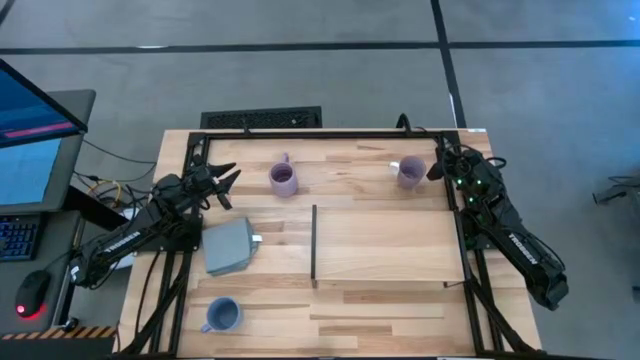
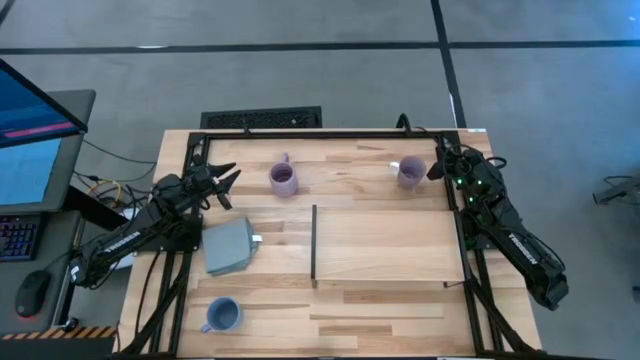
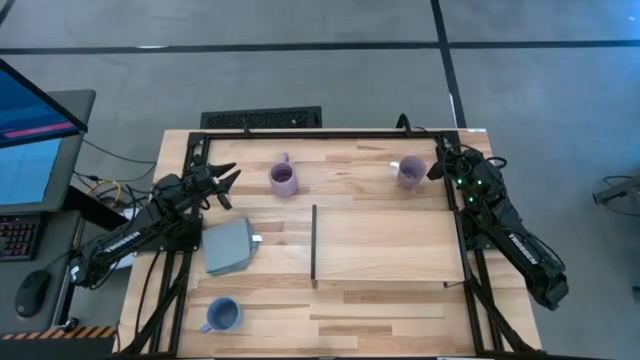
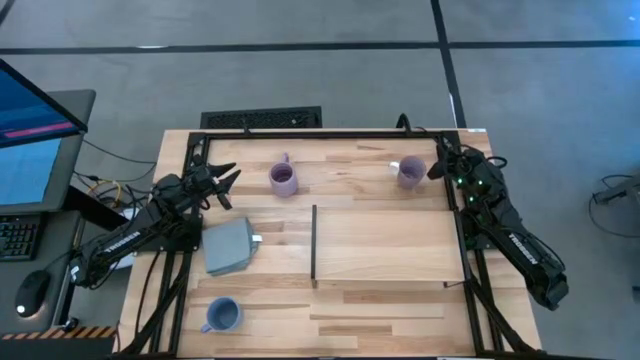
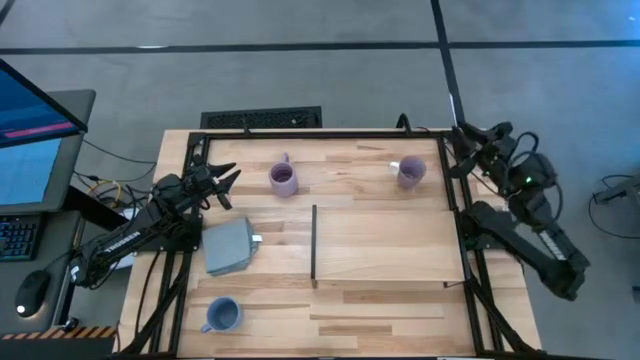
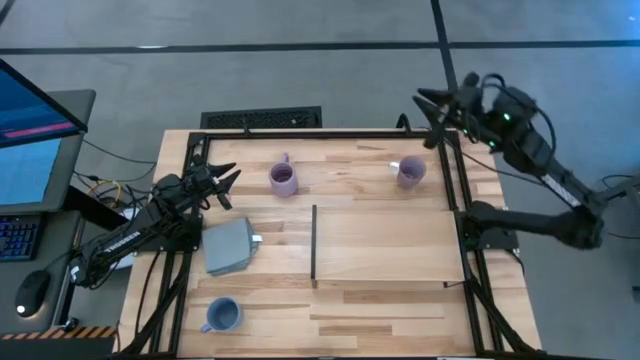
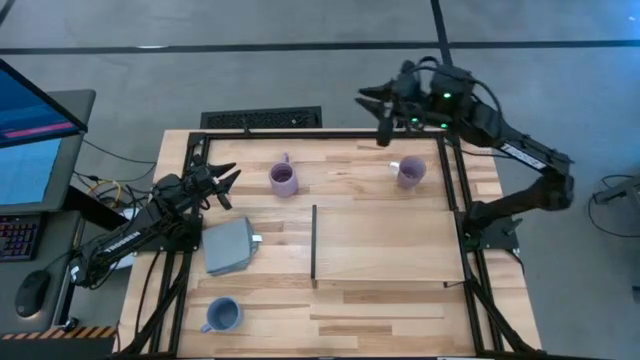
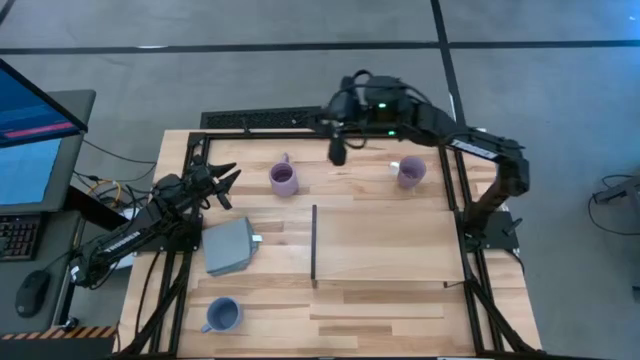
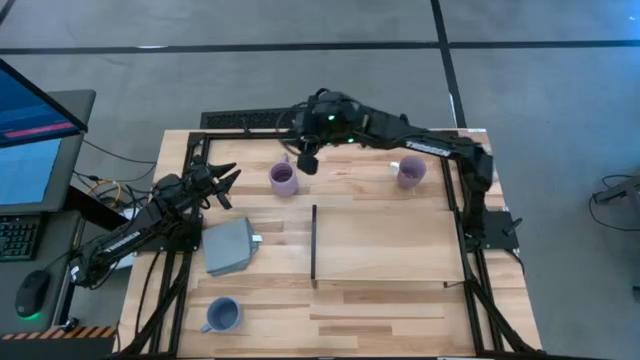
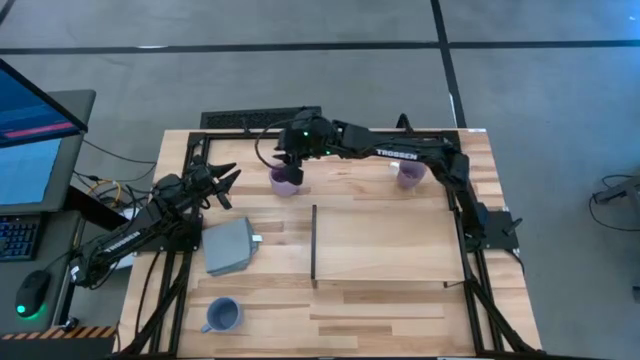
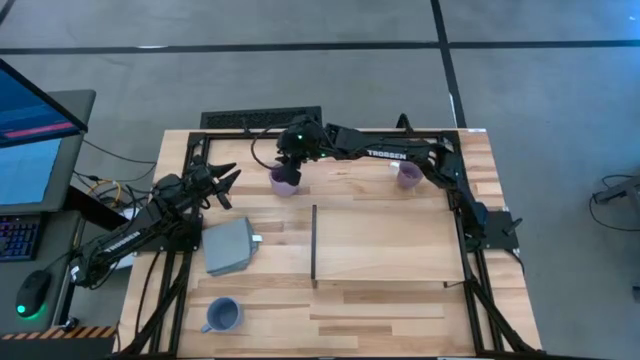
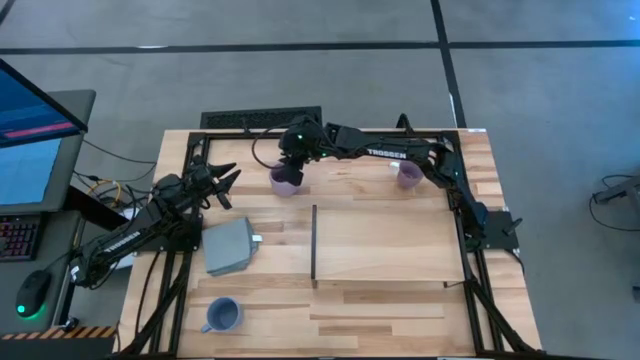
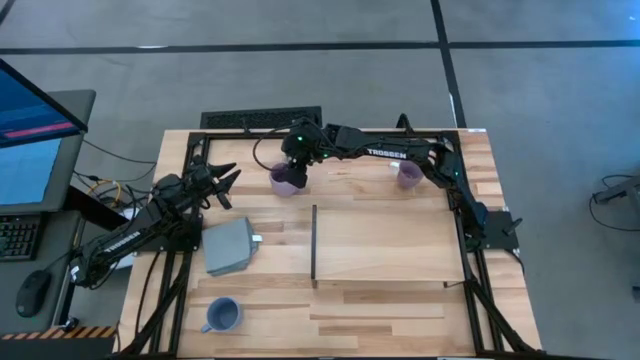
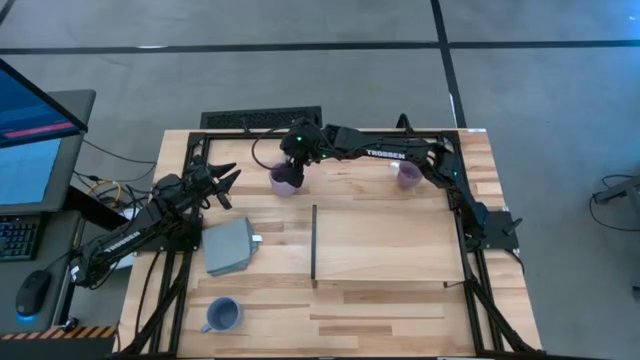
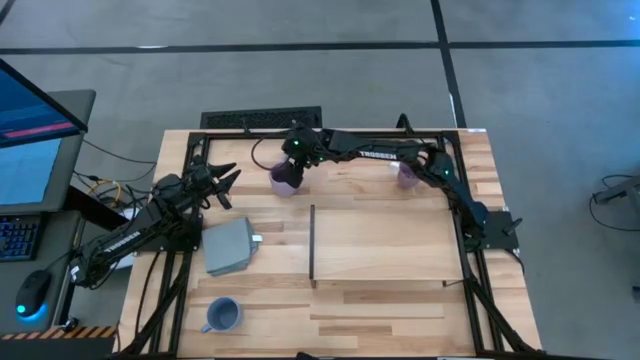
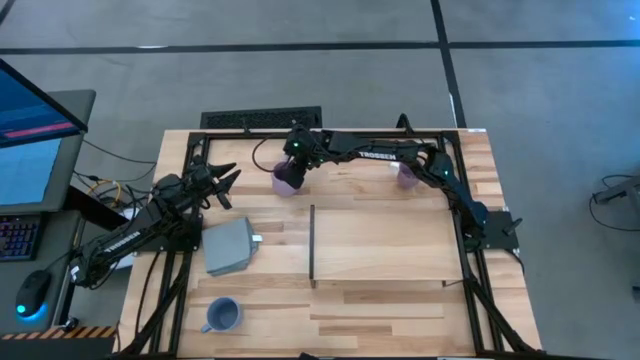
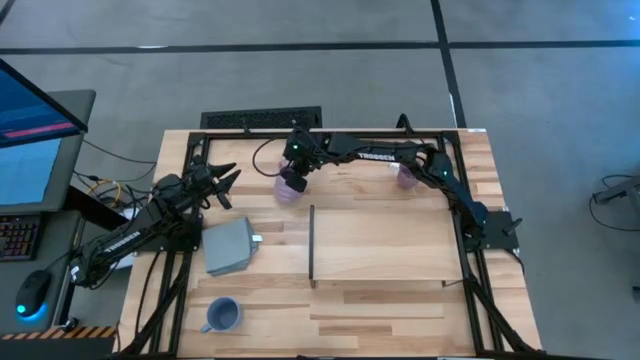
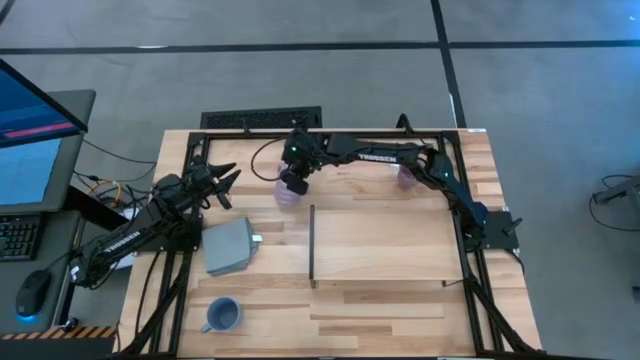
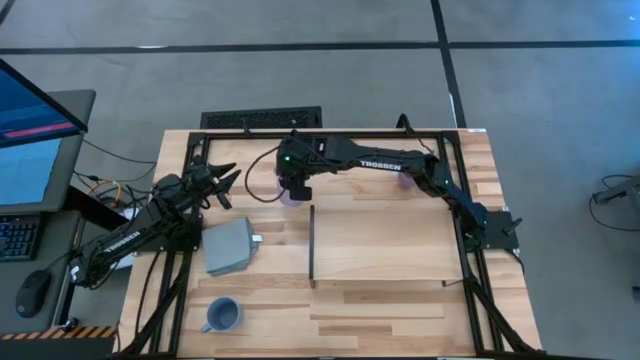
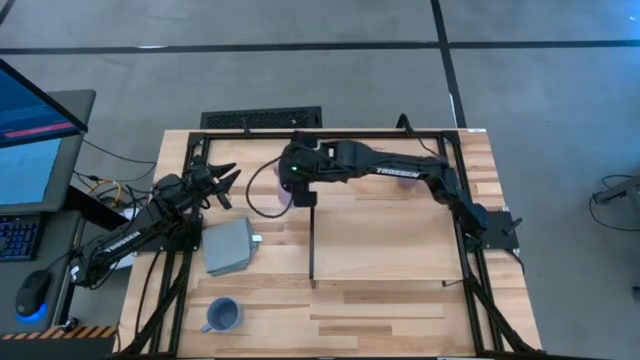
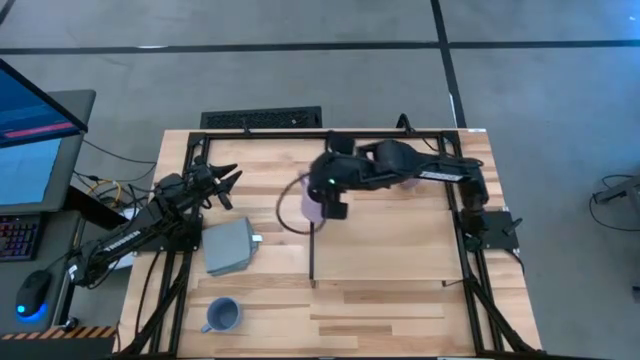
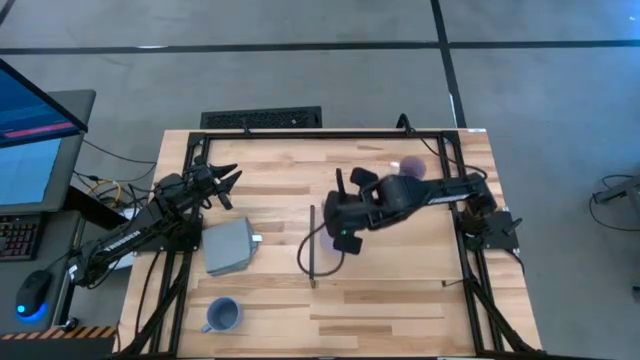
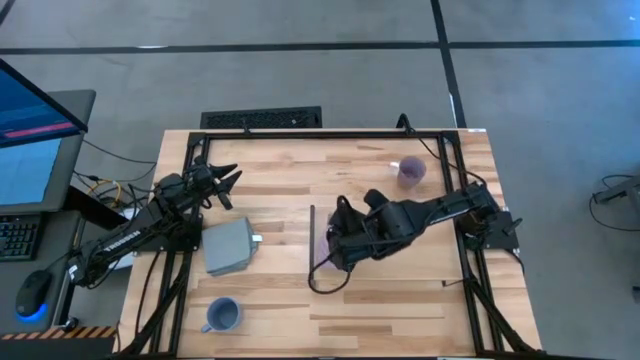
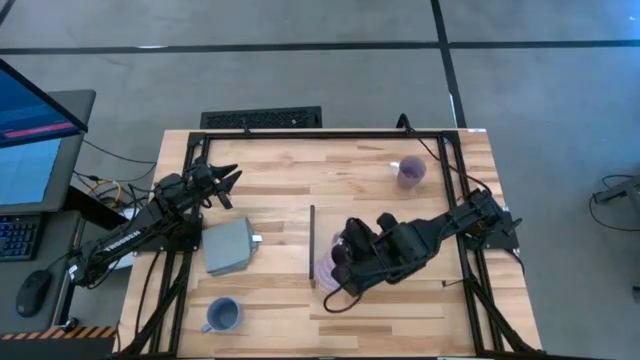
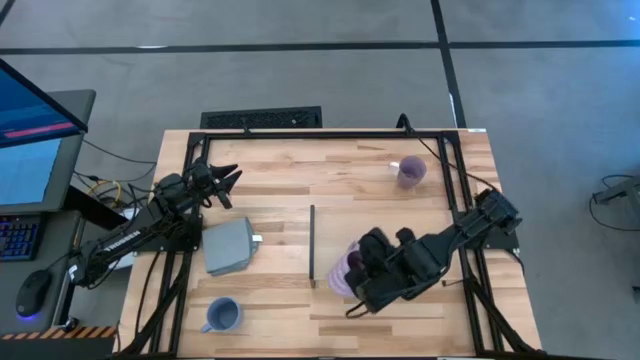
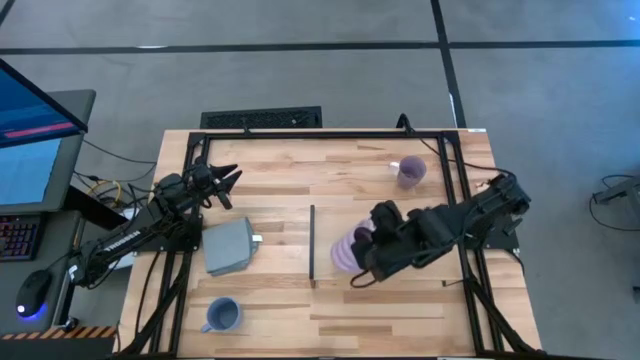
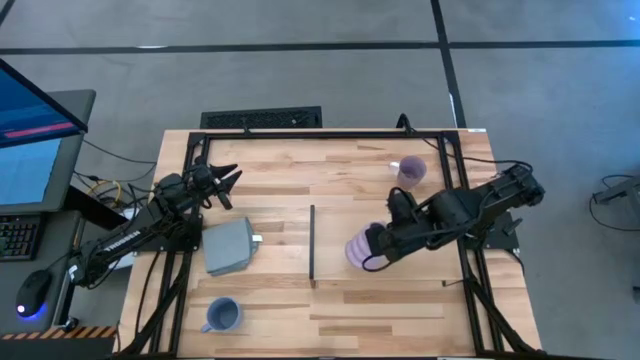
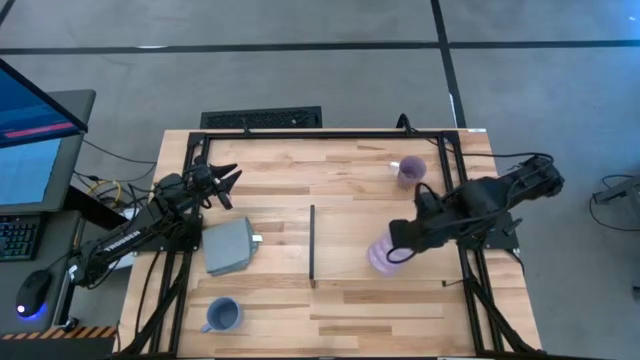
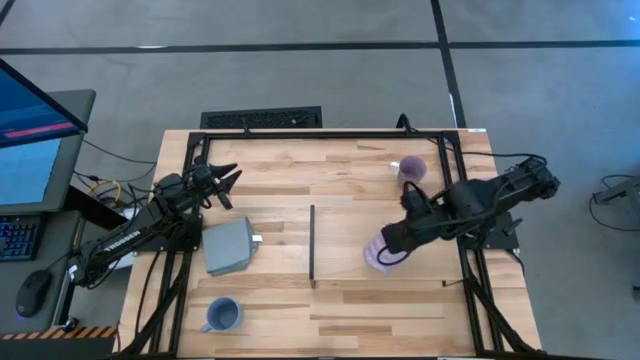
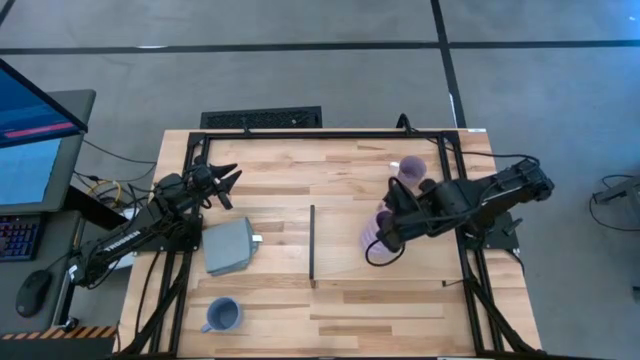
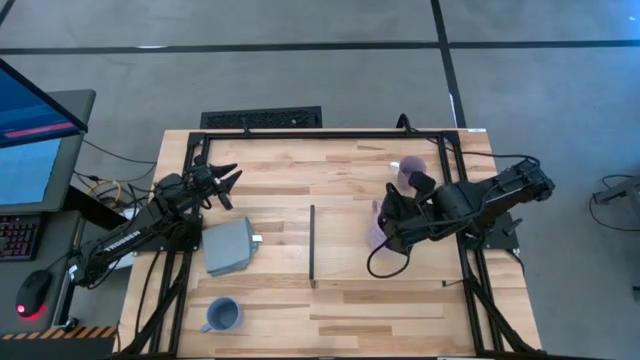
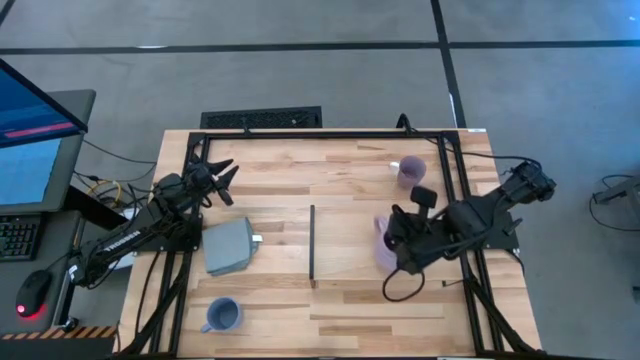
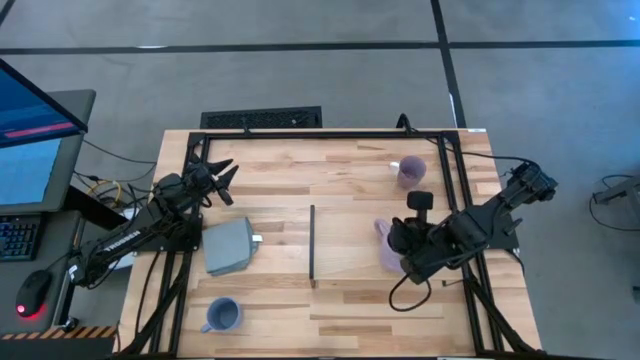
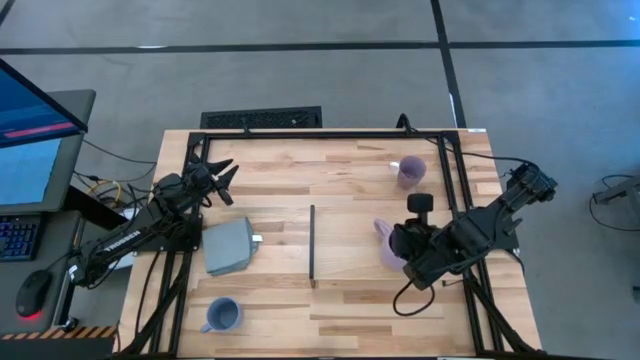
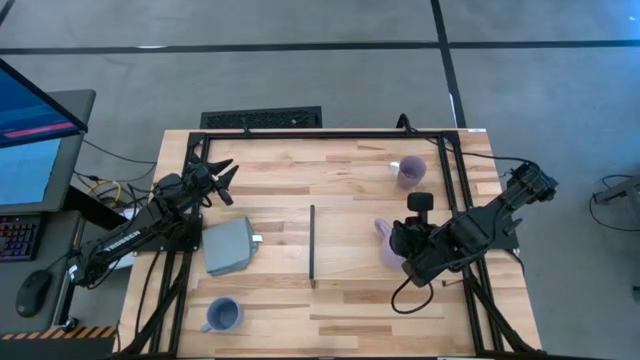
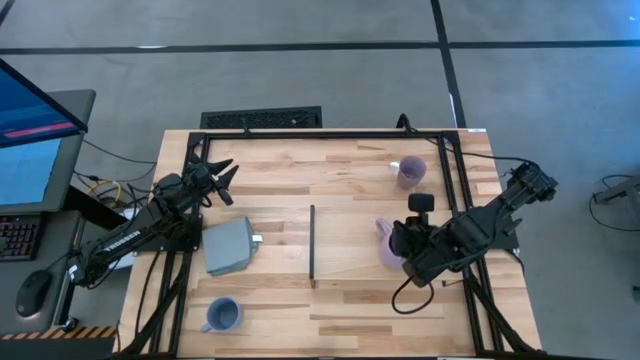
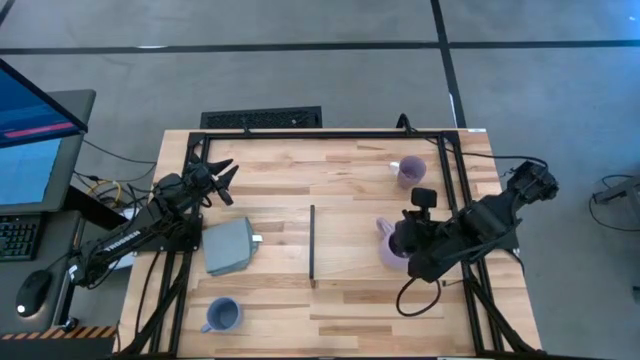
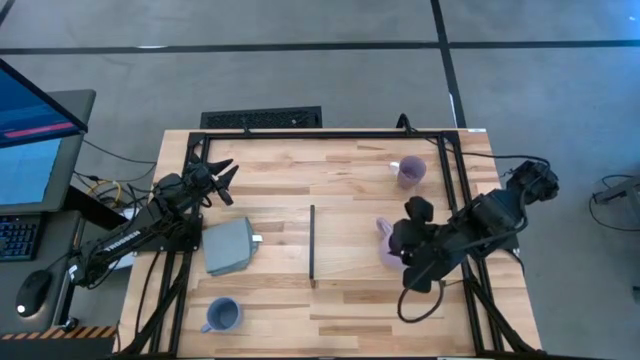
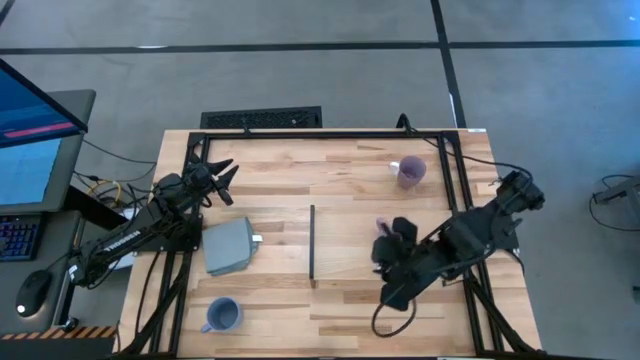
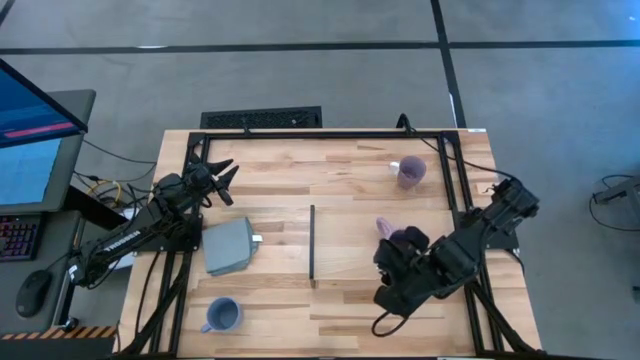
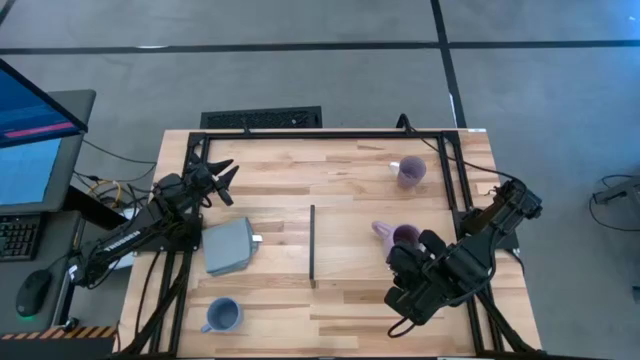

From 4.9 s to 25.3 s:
Task: Stack small to large cups/mugs on shelf
Put the purple mug on the shelf
